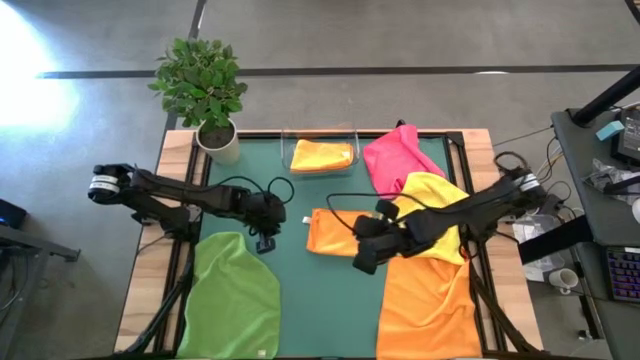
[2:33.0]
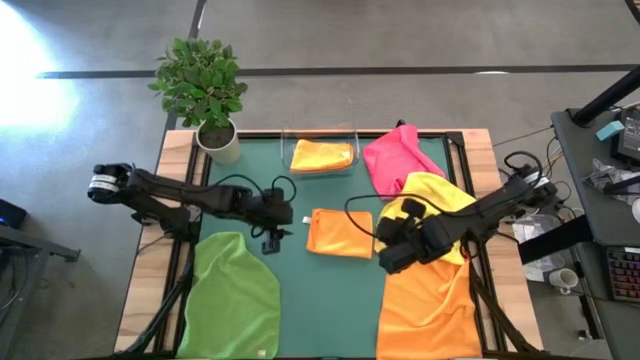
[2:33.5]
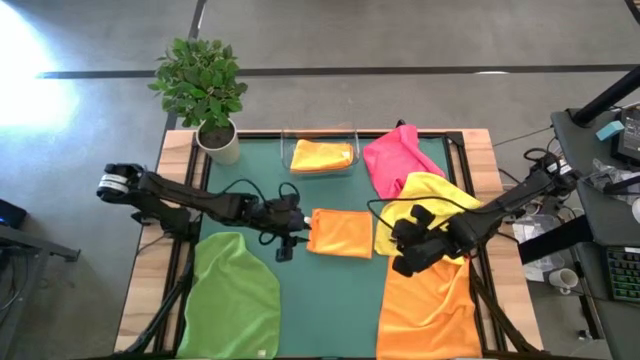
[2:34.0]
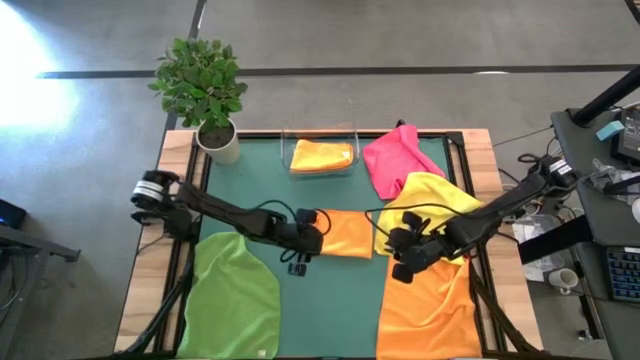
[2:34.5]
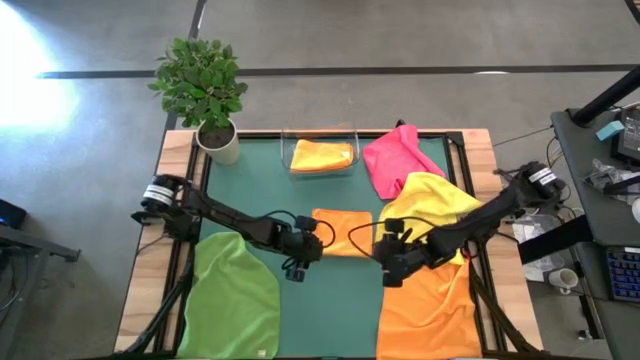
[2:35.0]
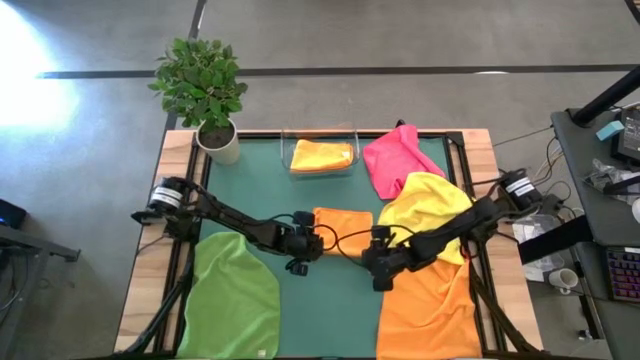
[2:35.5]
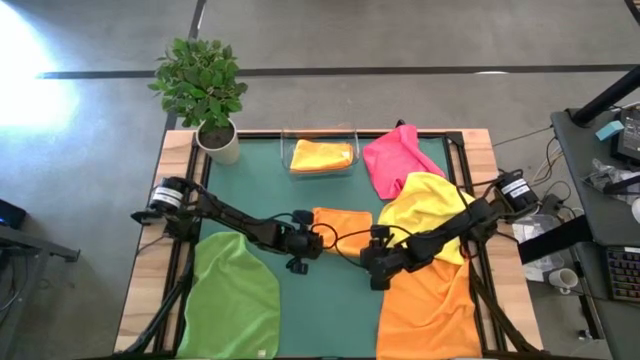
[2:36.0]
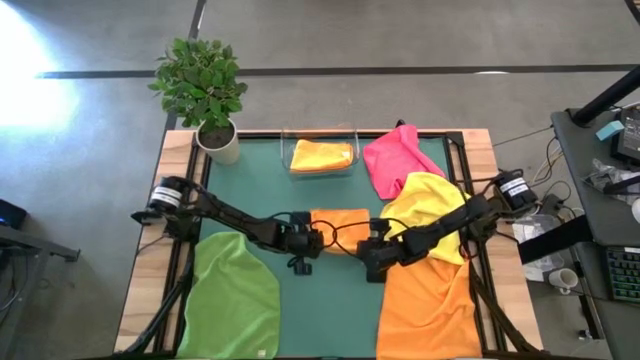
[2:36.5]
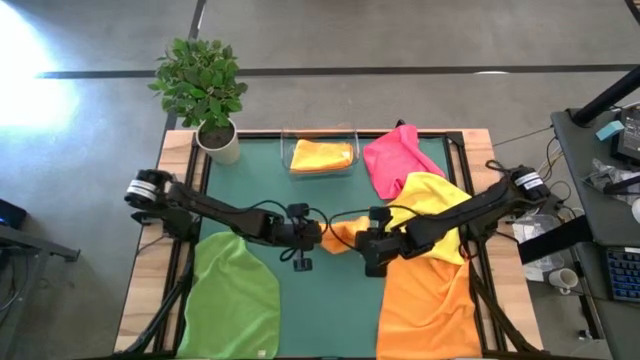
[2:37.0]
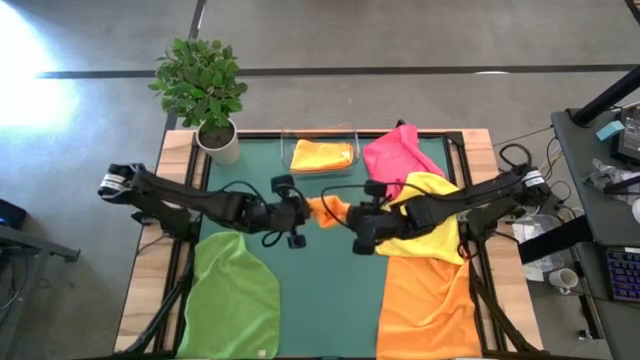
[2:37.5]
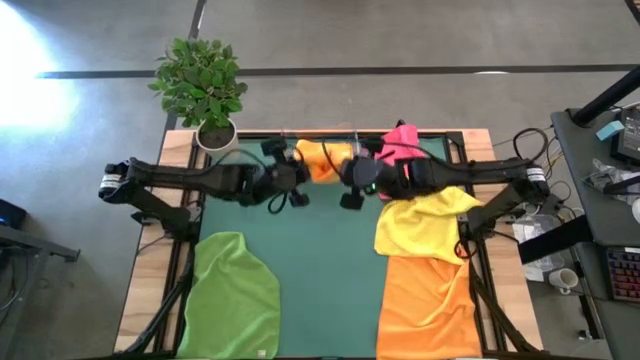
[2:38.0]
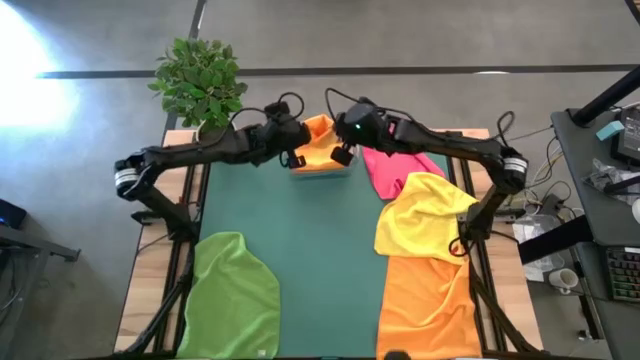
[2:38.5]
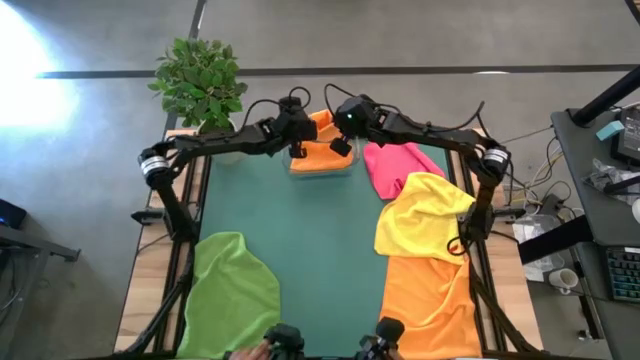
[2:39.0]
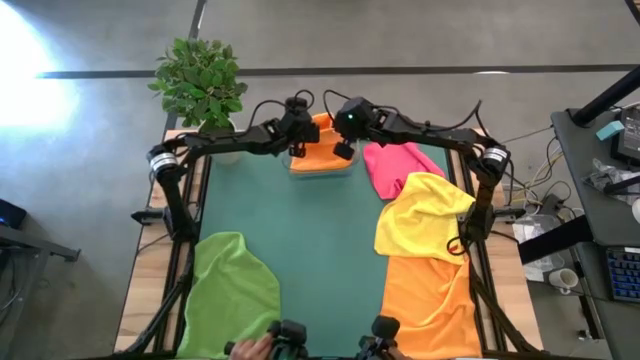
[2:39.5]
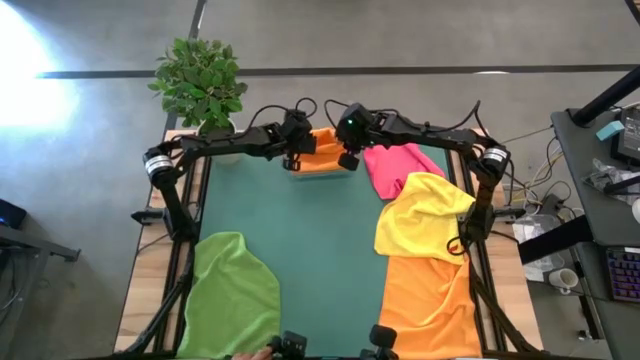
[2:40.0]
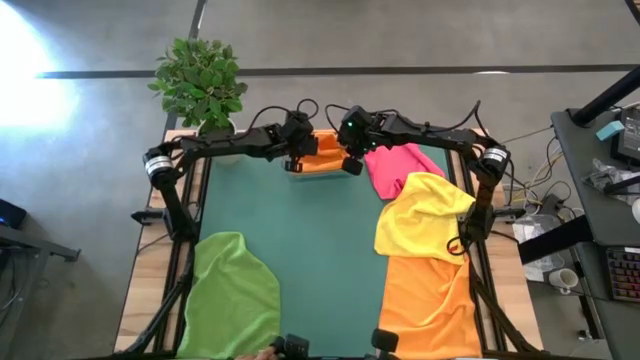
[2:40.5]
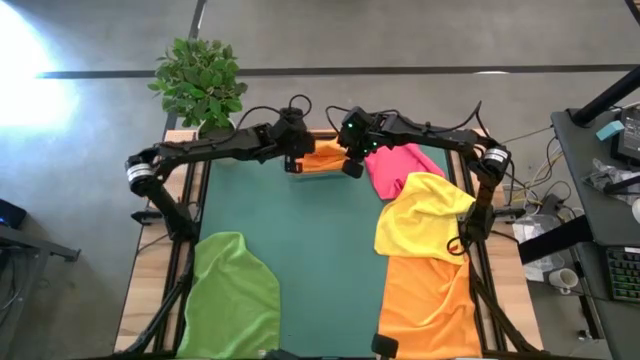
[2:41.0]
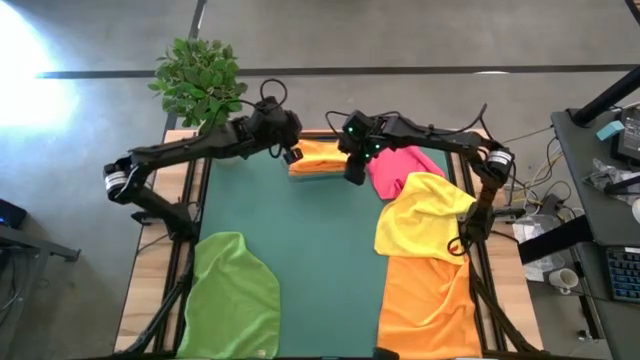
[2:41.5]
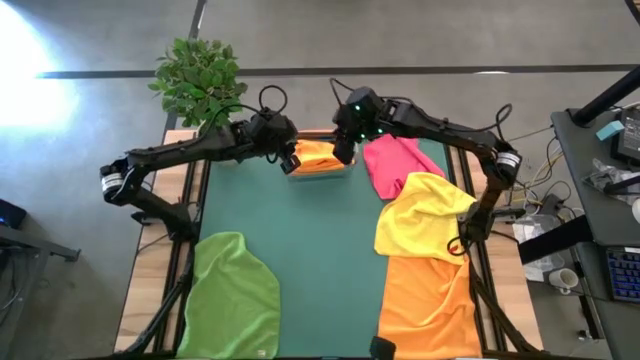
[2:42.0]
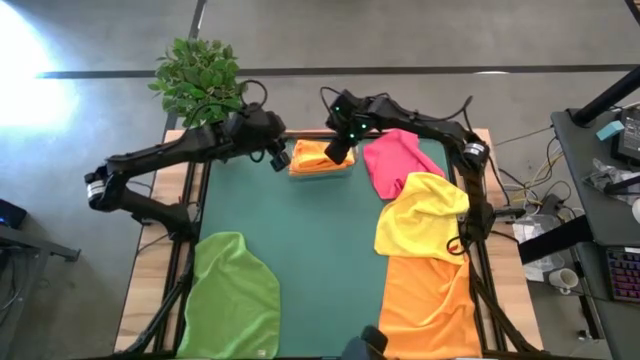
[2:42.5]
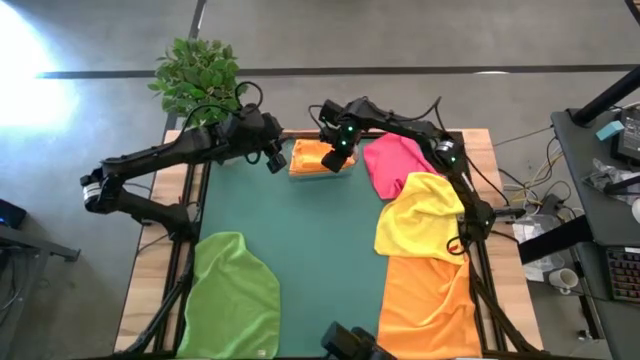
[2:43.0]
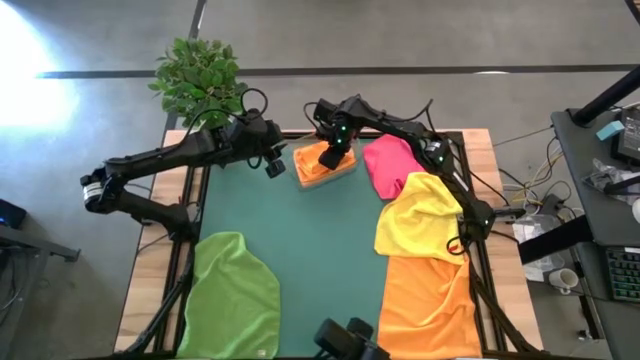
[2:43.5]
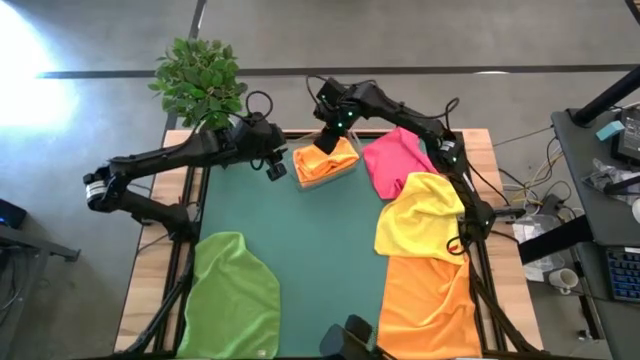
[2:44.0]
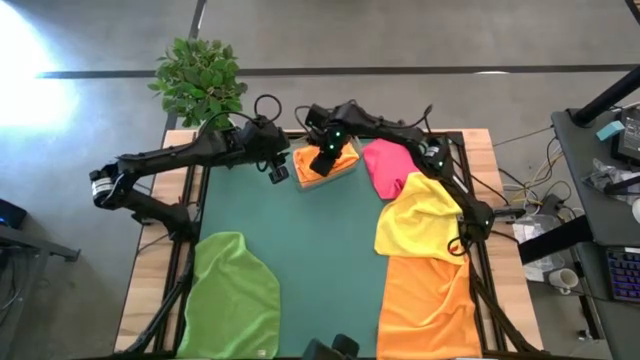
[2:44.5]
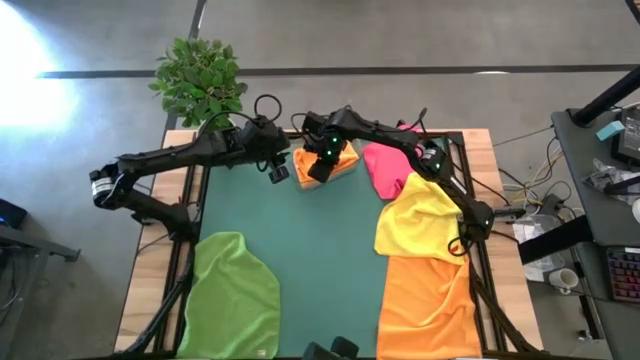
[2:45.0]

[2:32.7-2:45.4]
Task: Fold microfiber towels
Put the top left folded orange microfiber towel into the transparent bin

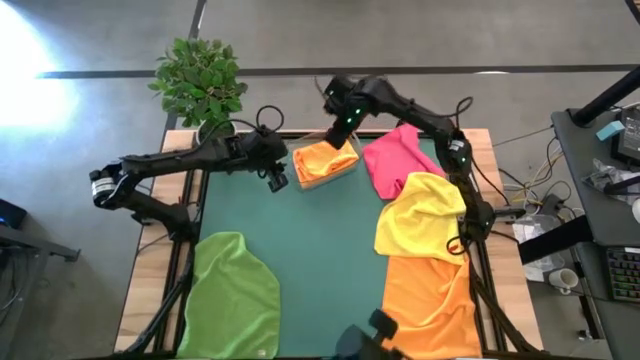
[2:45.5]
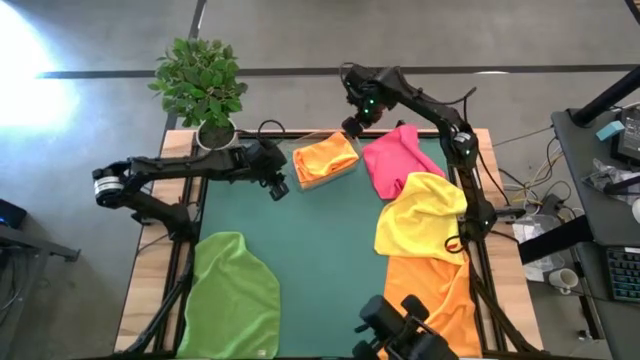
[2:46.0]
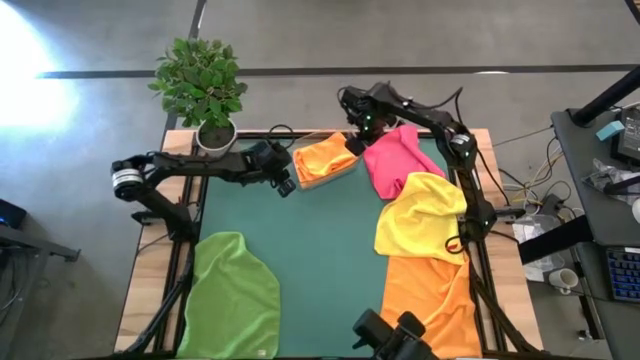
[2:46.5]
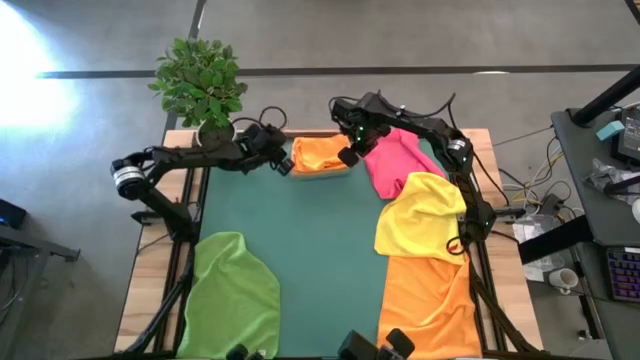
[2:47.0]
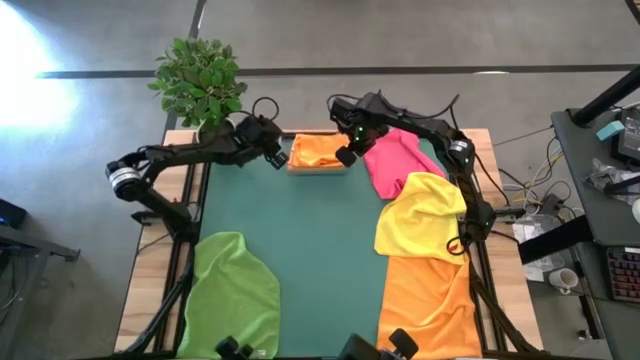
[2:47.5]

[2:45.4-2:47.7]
Adjust the transparent bin on the table
